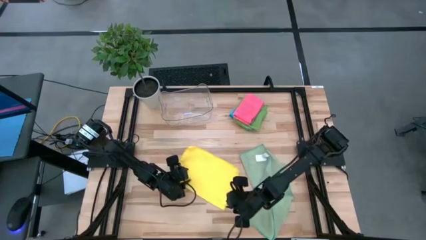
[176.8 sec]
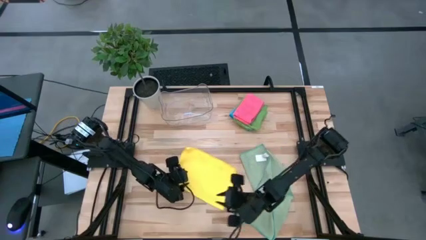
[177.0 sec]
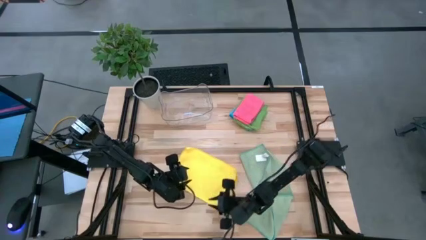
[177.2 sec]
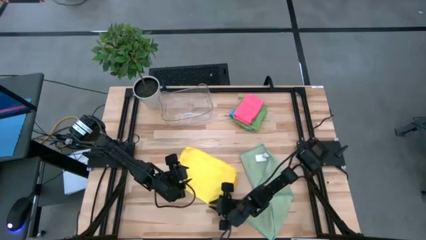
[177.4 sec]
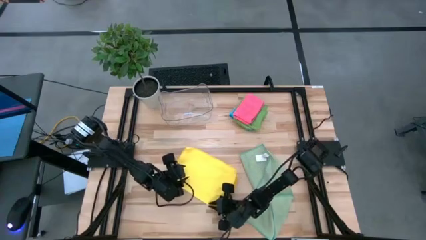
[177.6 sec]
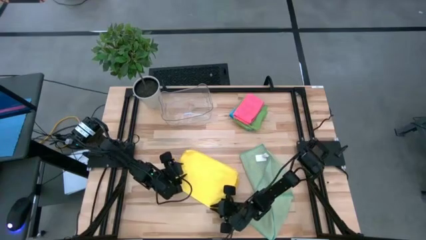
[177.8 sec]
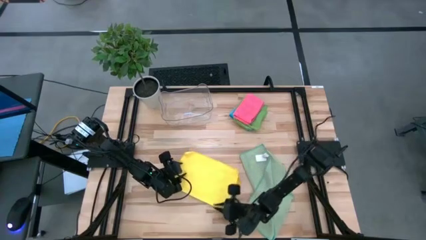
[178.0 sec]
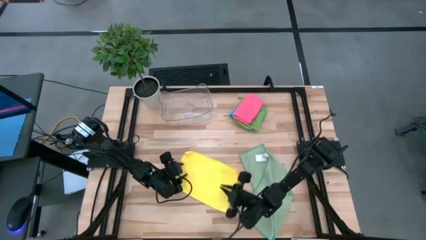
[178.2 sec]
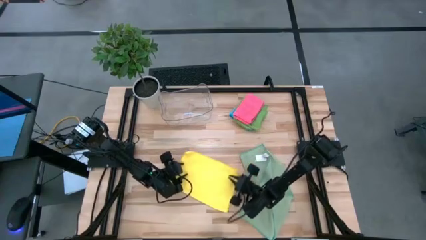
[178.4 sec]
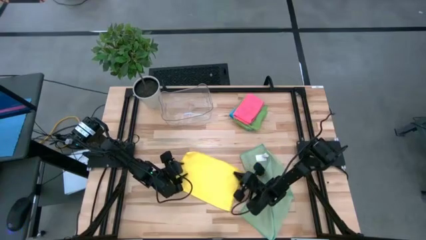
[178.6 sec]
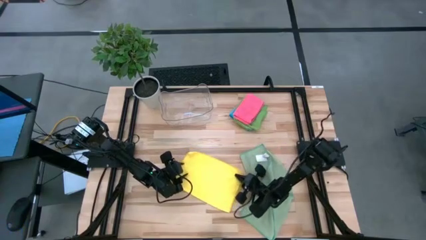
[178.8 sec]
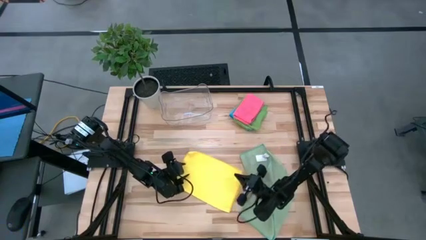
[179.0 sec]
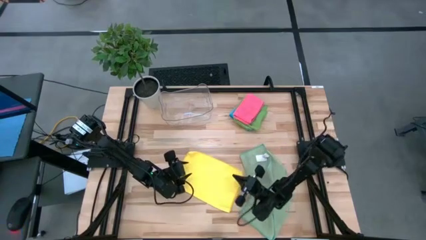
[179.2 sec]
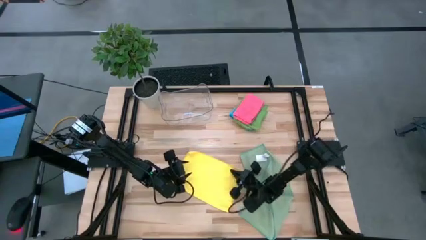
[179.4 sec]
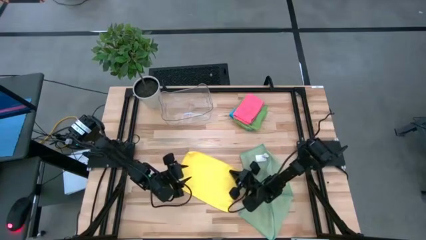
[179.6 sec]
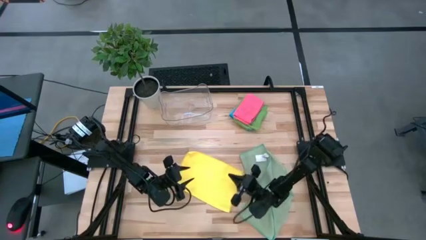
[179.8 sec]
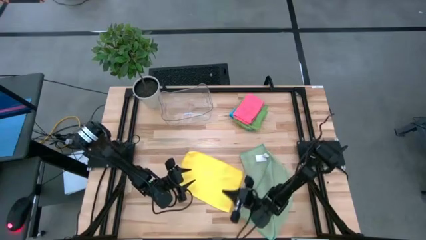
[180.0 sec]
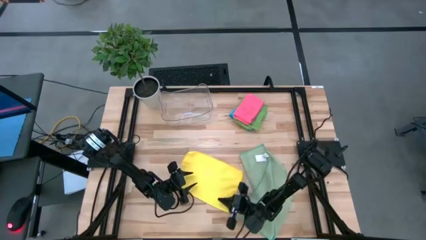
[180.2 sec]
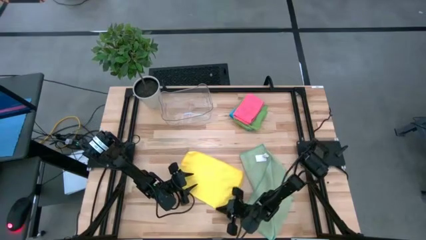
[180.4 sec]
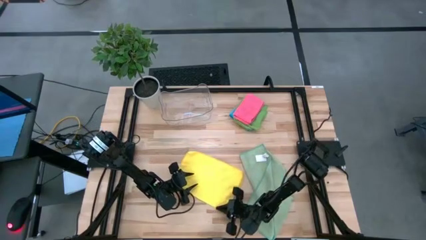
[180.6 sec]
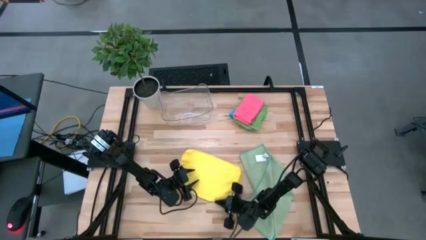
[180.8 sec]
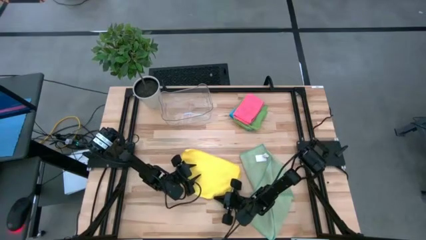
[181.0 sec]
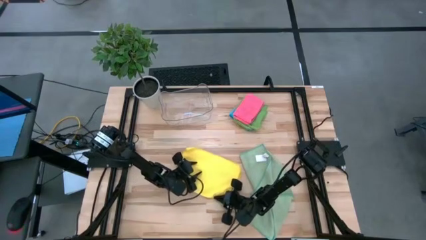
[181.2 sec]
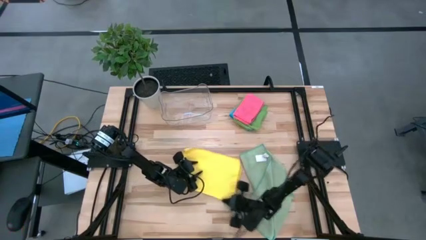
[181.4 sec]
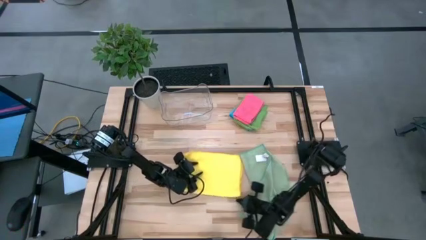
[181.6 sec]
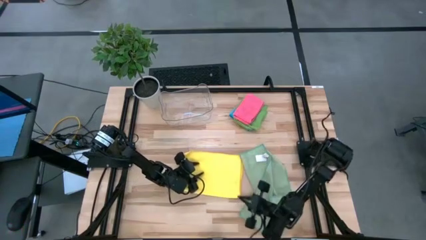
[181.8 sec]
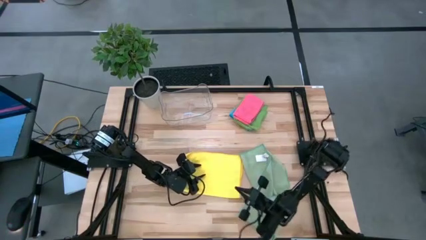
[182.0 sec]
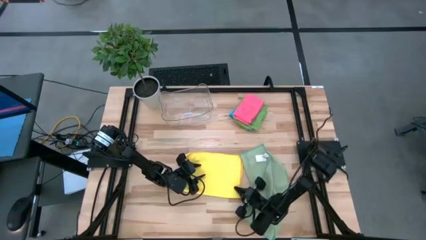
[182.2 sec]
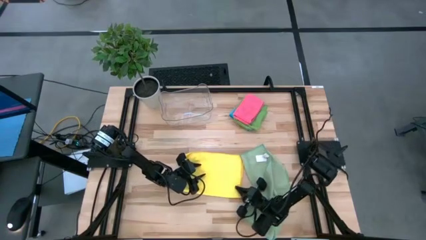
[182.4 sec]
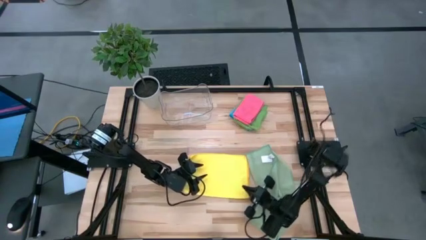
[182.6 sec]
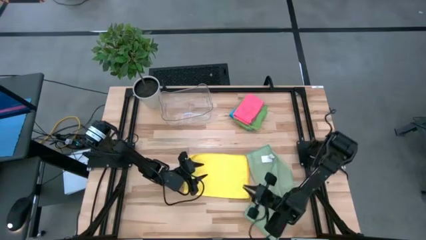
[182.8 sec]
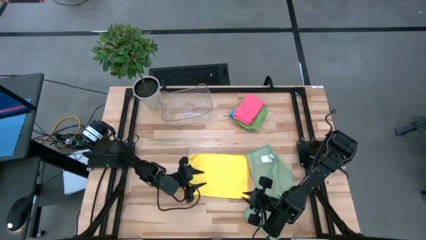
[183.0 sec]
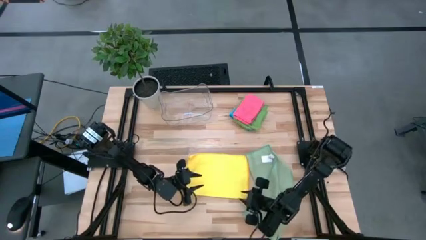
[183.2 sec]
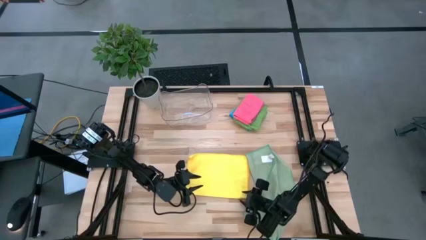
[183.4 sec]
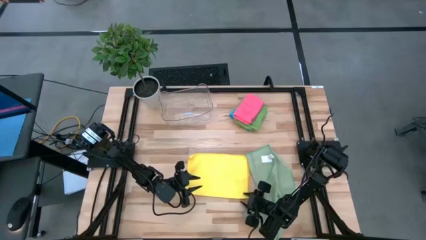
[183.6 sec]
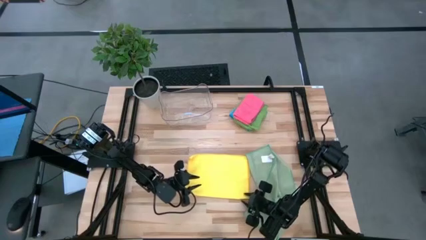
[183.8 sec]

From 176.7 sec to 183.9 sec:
Task: Fold microfiber towels
Fold the yellow microfiber cloth

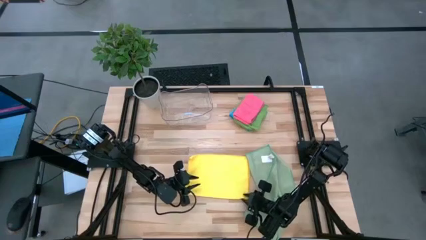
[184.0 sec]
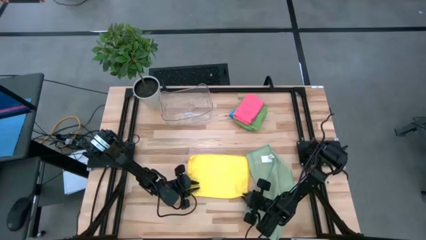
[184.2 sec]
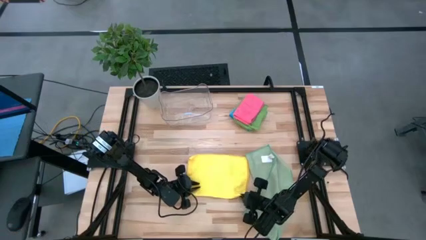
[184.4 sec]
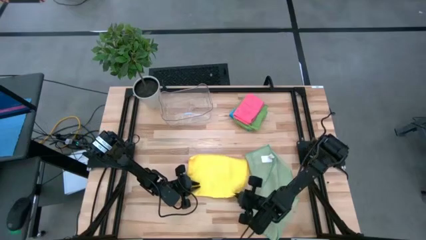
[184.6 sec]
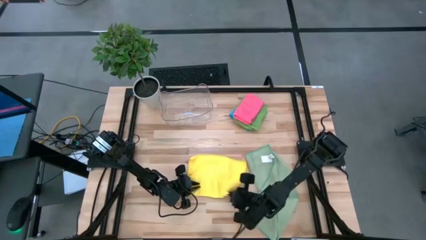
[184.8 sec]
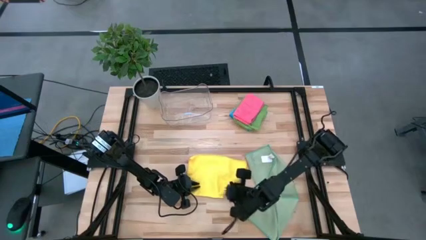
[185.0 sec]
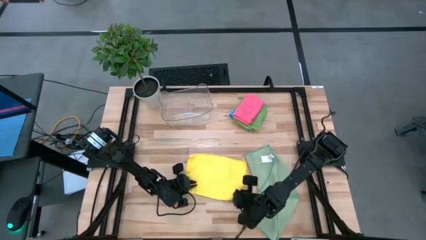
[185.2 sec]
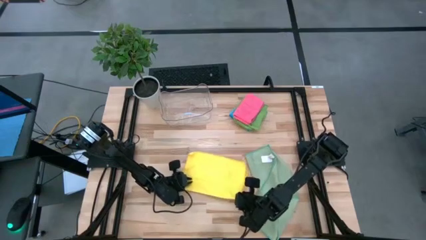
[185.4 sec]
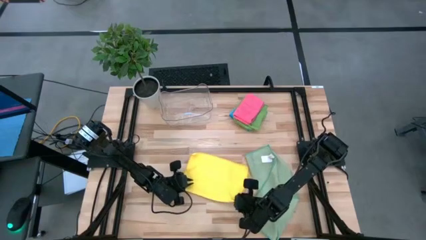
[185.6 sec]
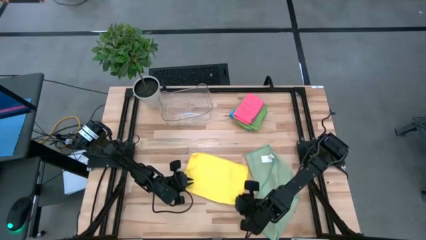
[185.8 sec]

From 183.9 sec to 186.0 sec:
Fold the yellow microfiber cloth

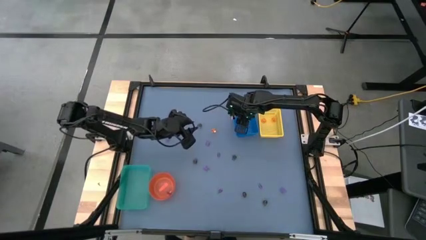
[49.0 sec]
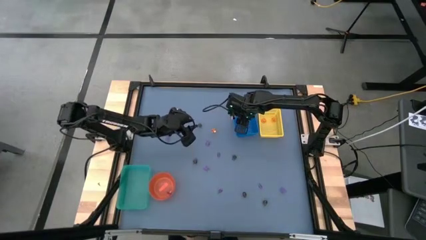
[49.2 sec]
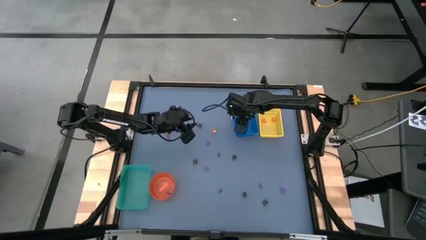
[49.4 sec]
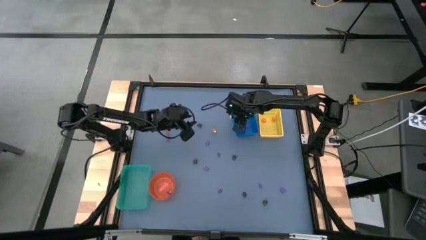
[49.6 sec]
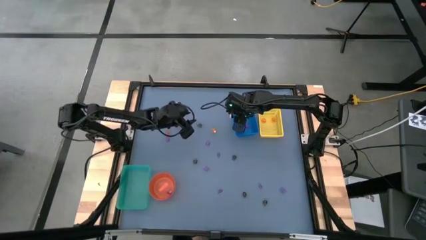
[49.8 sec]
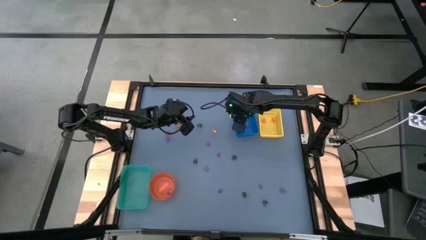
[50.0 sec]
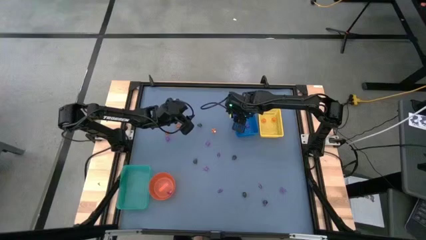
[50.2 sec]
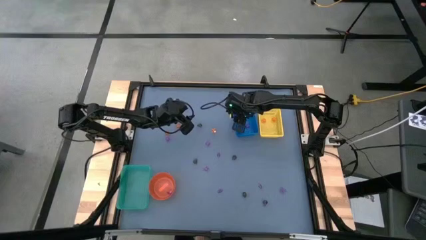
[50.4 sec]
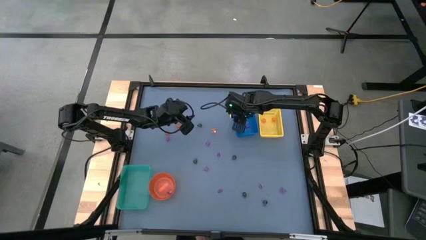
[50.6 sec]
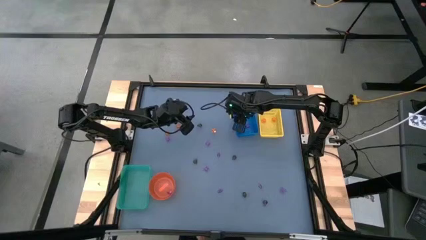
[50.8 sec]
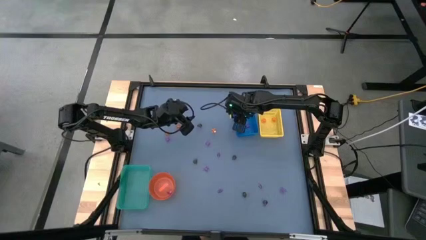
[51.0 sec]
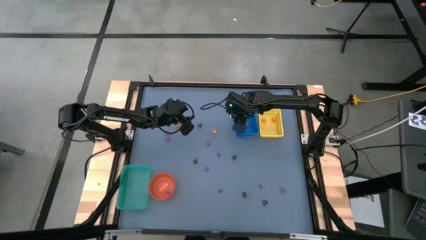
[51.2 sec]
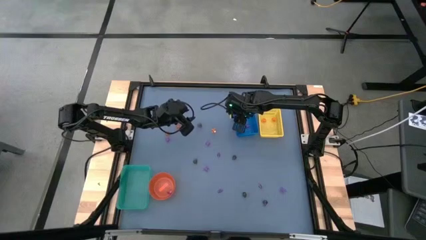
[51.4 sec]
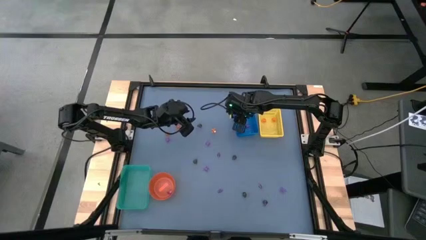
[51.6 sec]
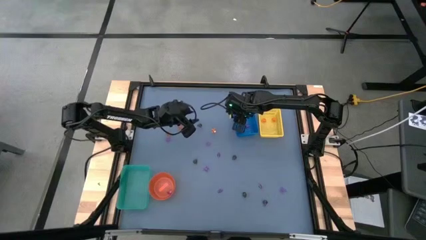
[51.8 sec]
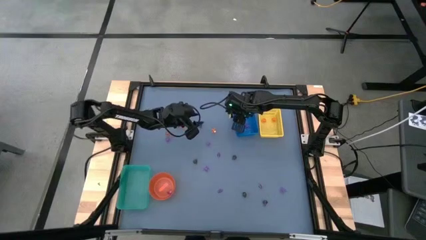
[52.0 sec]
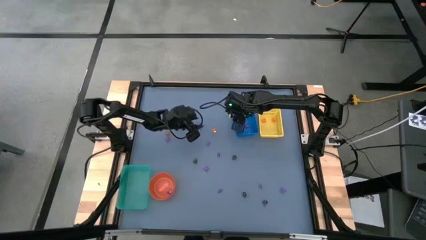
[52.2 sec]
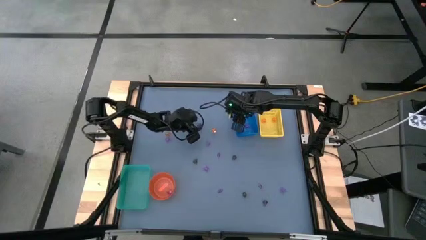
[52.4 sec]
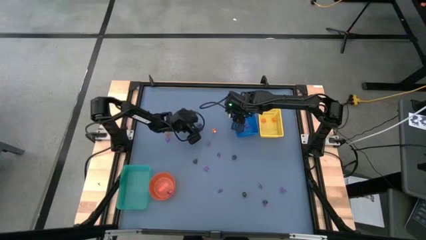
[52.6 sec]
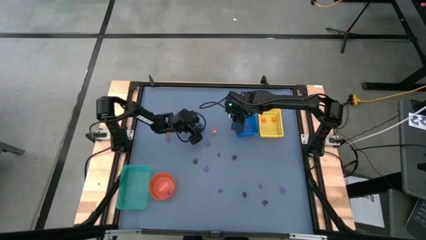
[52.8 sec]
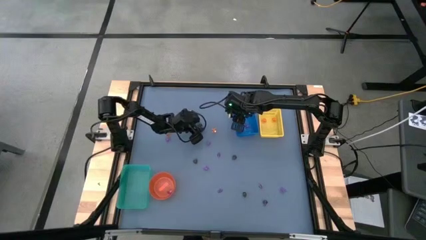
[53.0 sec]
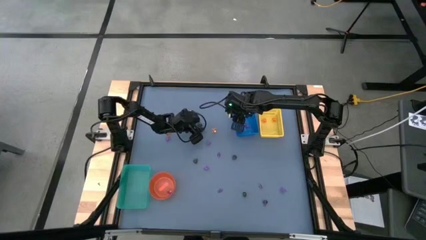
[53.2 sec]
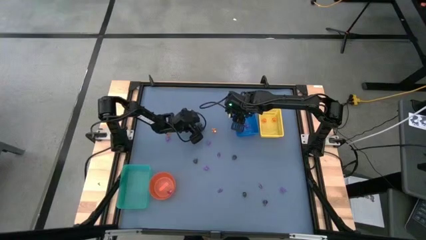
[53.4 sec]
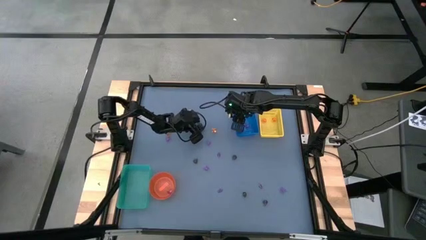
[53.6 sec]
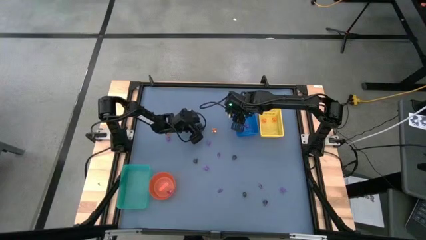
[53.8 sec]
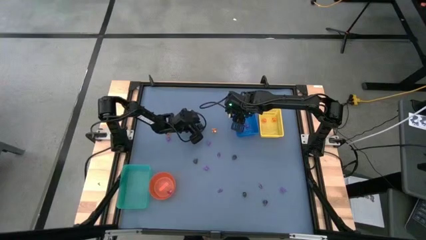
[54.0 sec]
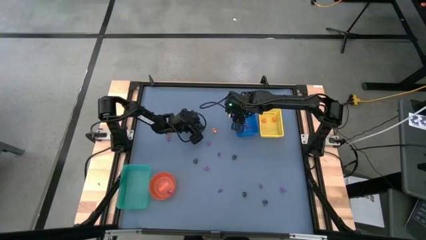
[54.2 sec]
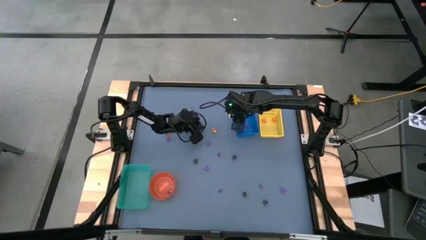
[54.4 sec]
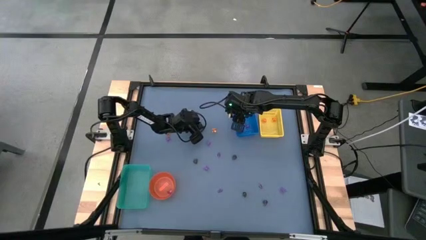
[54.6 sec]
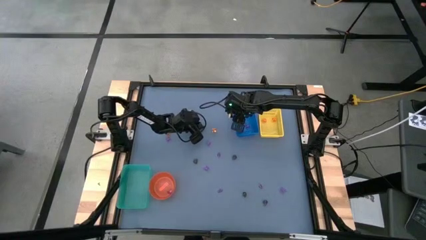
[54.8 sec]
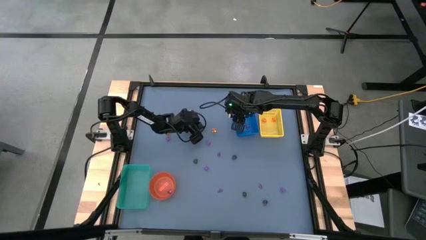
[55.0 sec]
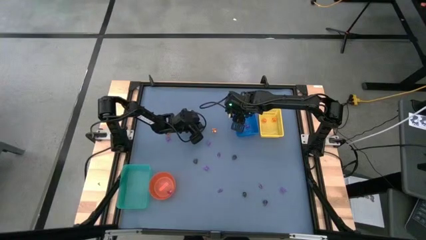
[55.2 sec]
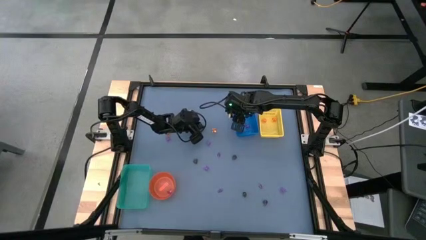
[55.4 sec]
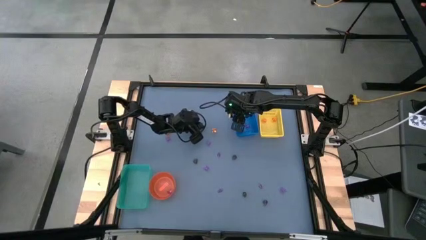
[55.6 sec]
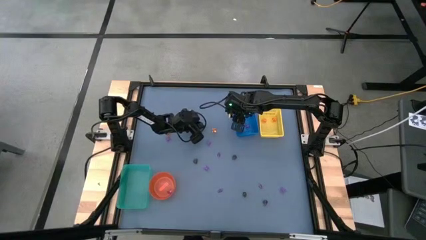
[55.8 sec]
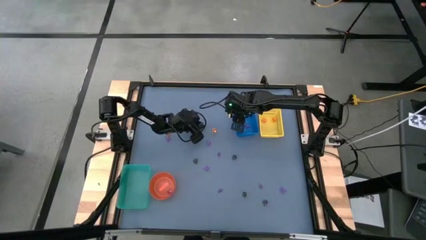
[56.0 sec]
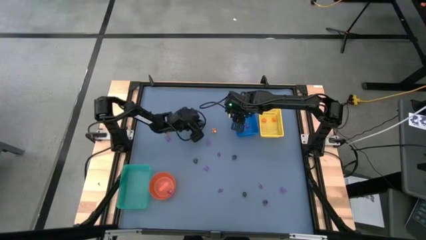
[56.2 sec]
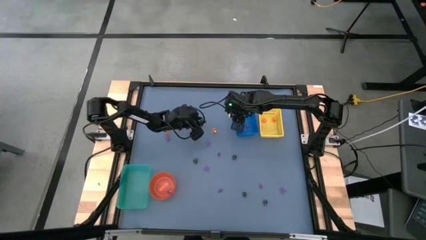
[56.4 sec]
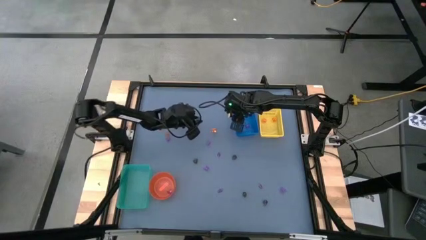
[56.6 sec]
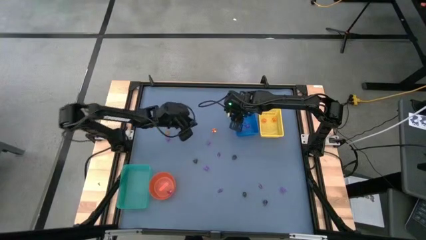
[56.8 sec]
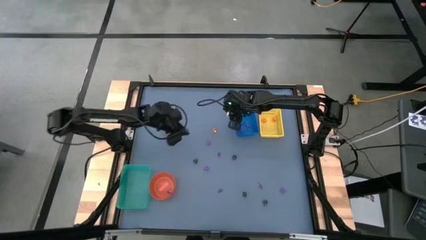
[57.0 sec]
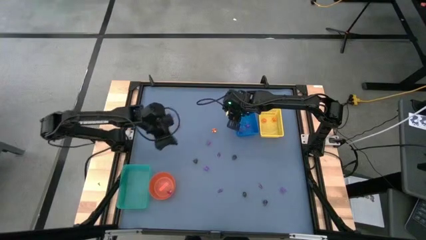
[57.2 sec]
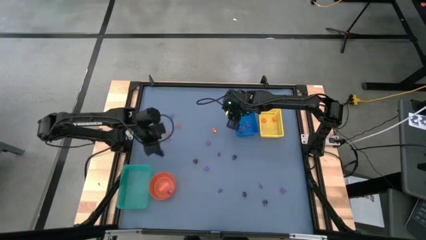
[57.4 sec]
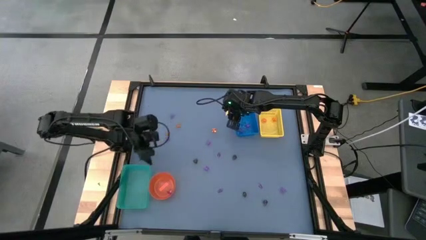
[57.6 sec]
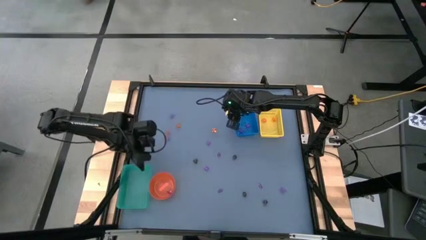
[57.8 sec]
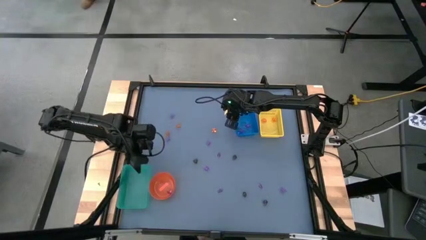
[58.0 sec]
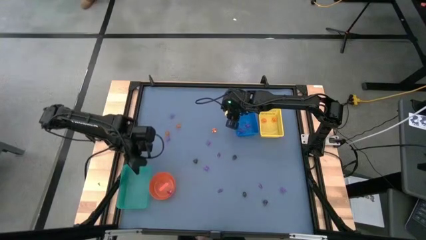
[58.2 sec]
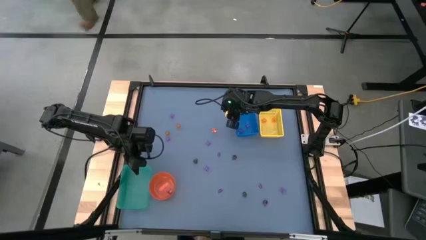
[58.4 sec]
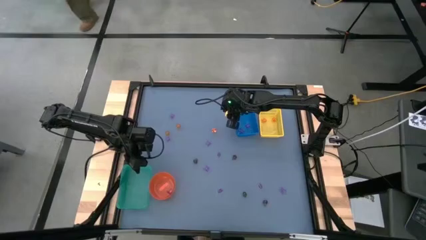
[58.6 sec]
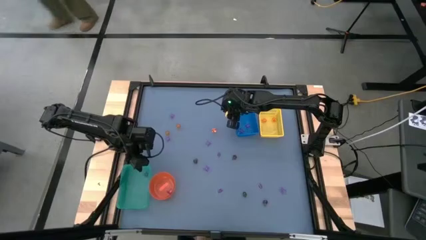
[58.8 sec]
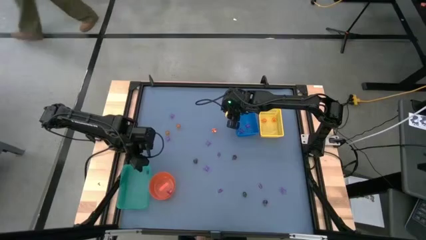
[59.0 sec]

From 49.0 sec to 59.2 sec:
Task: Sort Halloween decoration
Put the brown skull toy into the green bin
